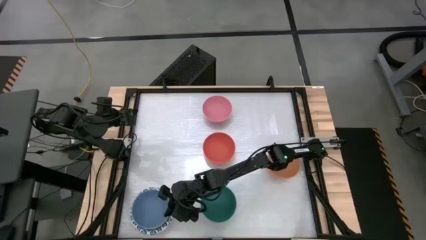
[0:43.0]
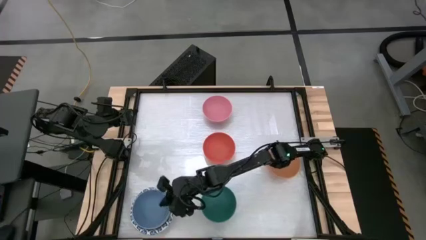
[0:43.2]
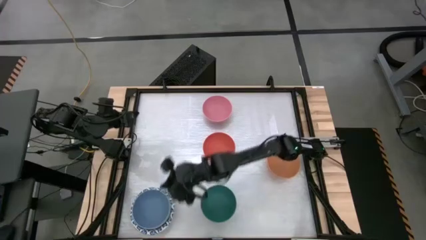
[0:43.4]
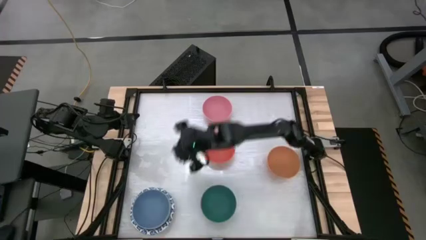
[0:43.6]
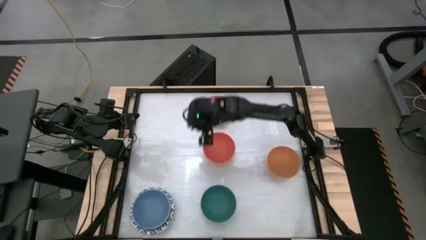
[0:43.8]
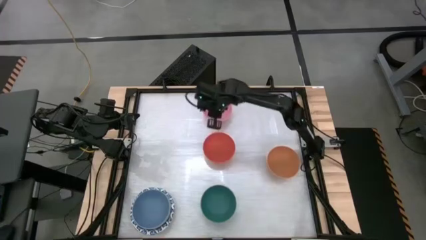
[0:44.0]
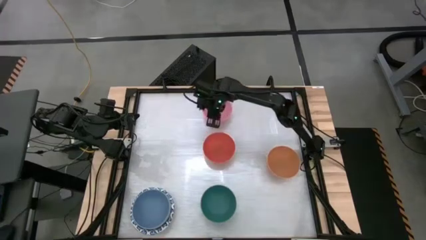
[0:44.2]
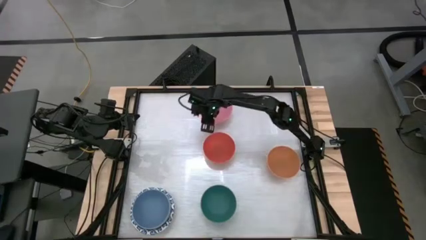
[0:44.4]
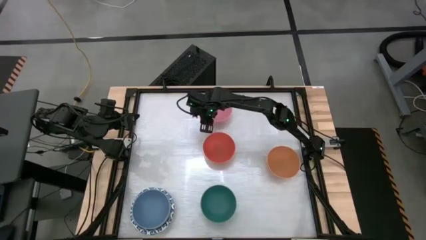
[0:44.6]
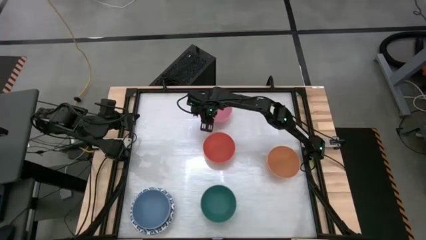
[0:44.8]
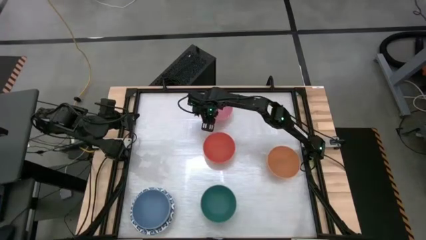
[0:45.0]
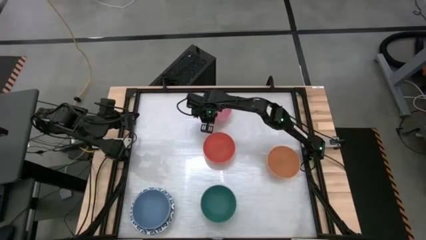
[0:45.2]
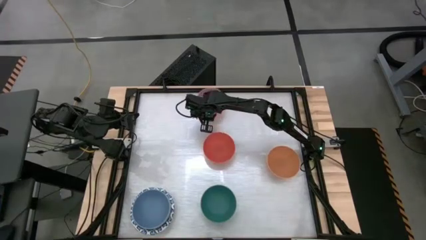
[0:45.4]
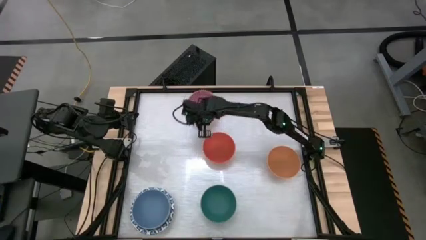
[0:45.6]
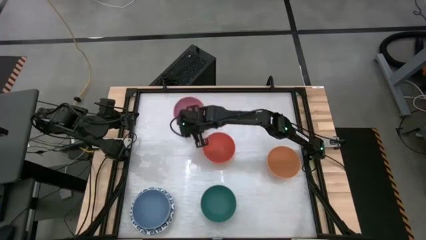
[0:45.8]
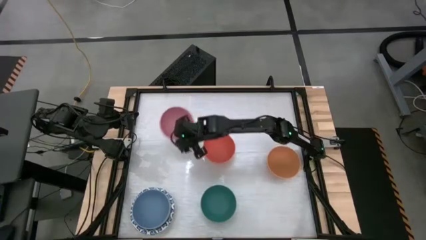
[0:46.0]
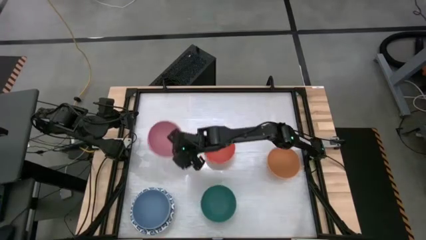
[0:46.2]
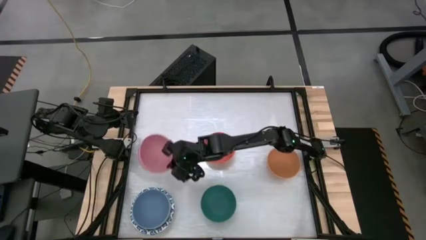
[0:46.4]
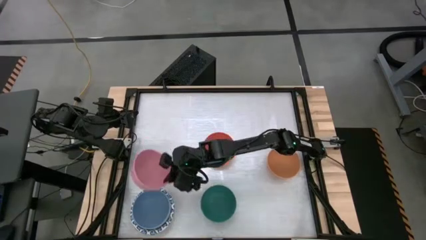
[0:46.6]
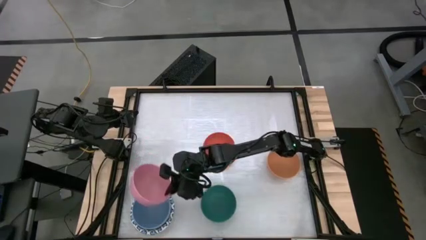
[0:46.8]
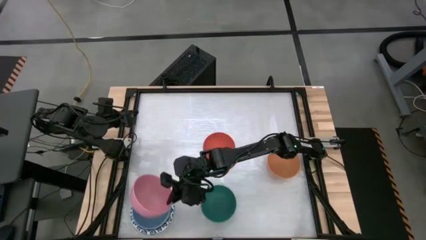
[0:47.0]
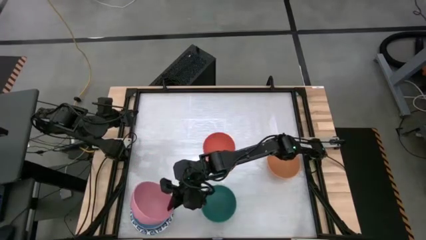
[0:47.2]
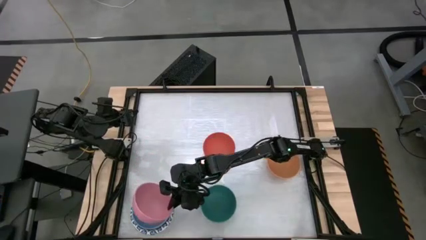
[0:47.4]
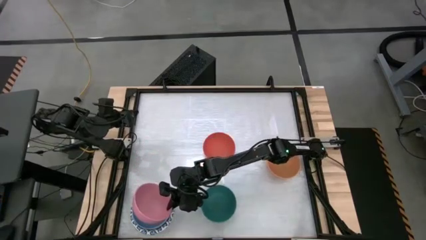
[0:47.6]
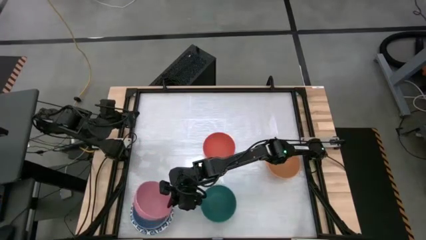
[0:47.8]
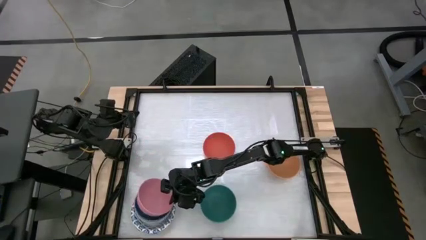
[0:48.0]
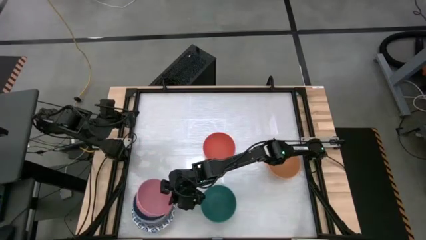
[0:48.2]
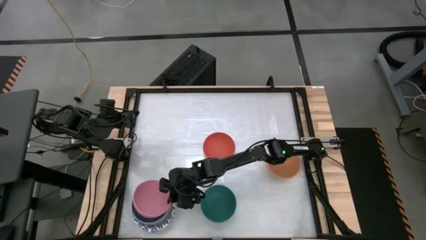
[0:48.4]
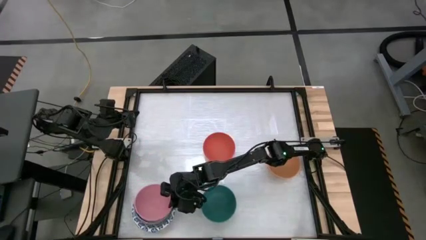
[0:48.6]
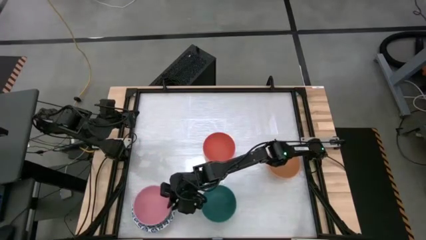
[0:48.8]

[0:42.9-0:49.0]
Stack the pink bowl into on top of the blue bowl
